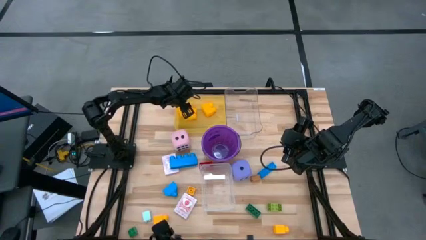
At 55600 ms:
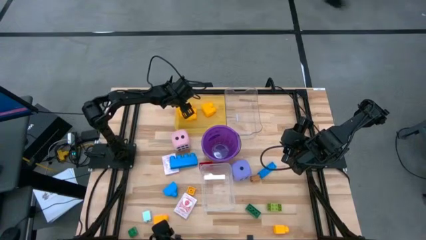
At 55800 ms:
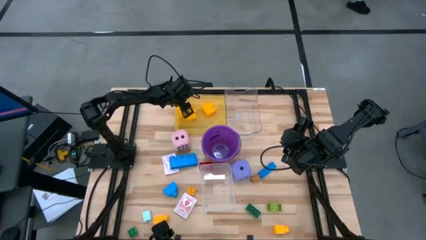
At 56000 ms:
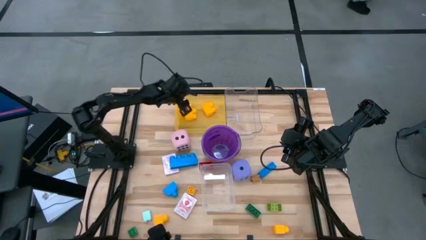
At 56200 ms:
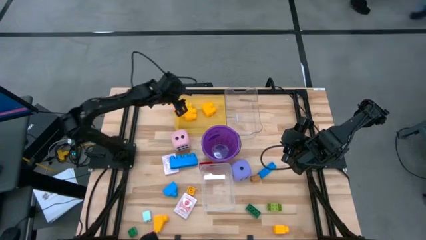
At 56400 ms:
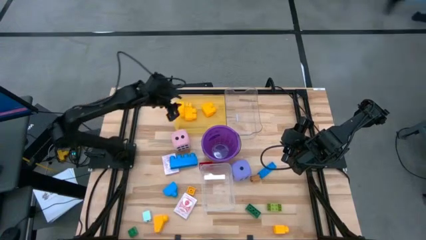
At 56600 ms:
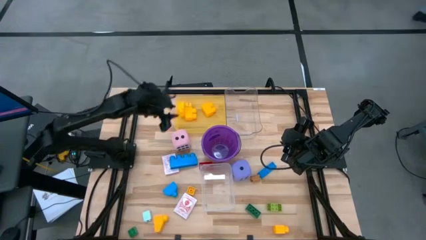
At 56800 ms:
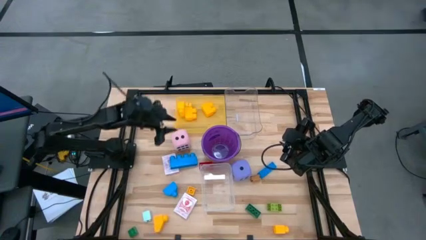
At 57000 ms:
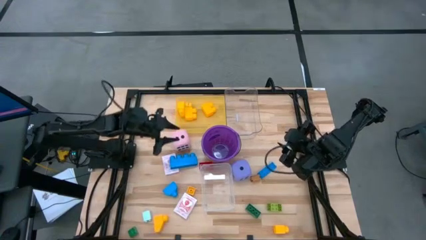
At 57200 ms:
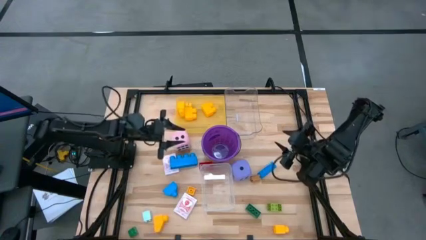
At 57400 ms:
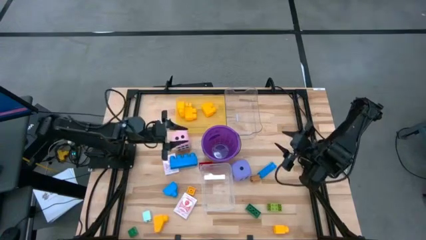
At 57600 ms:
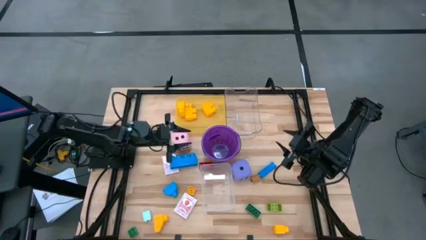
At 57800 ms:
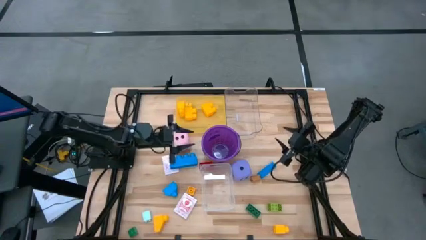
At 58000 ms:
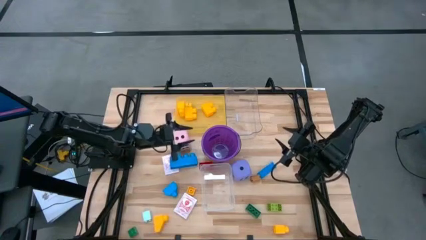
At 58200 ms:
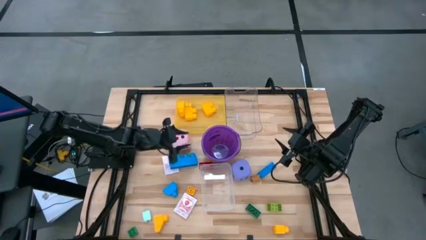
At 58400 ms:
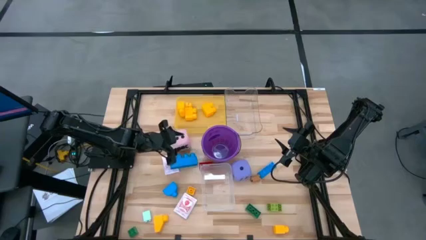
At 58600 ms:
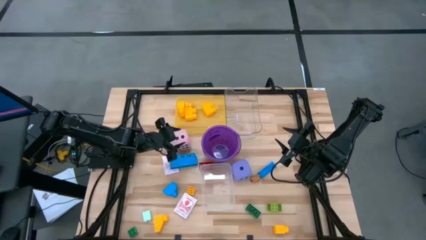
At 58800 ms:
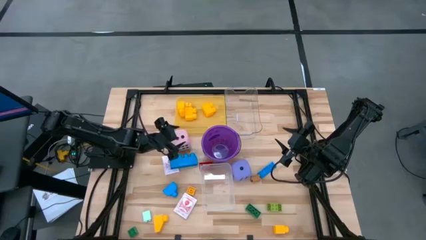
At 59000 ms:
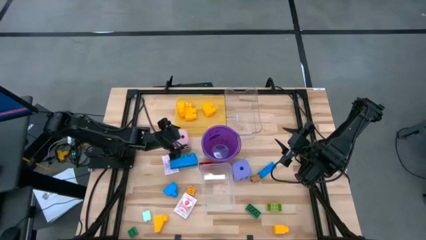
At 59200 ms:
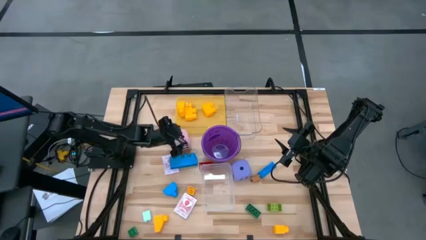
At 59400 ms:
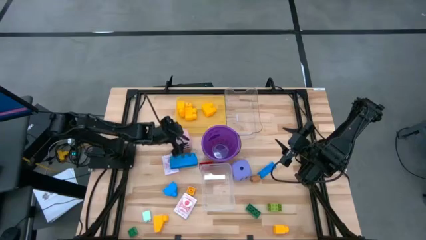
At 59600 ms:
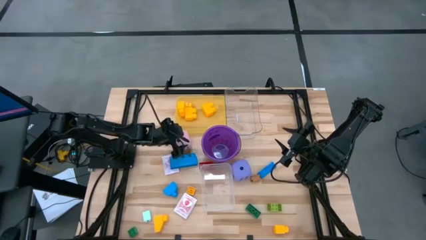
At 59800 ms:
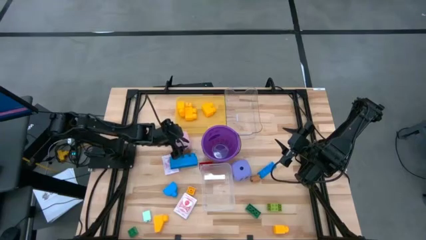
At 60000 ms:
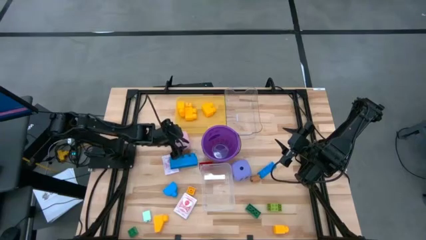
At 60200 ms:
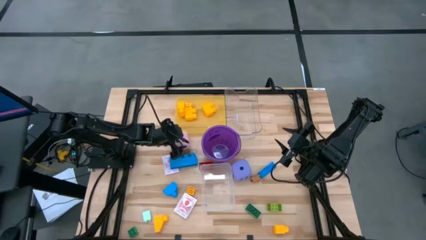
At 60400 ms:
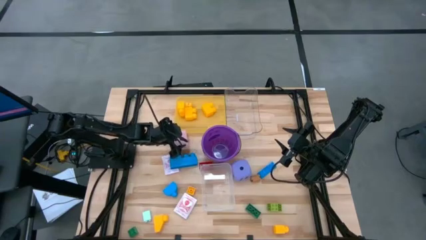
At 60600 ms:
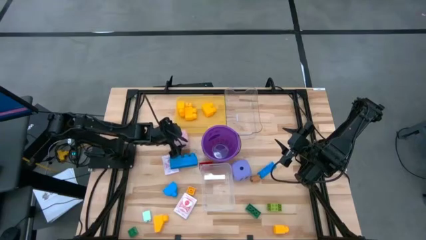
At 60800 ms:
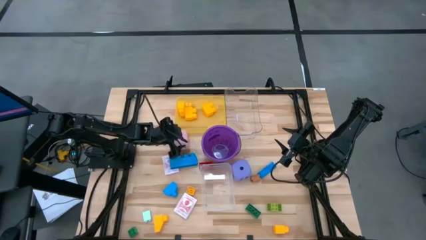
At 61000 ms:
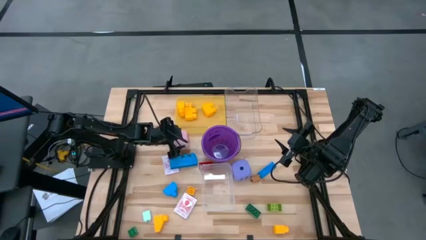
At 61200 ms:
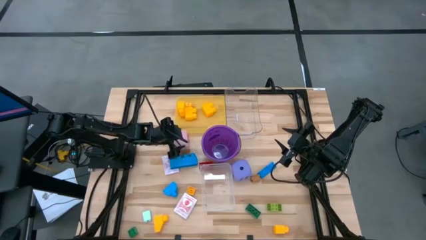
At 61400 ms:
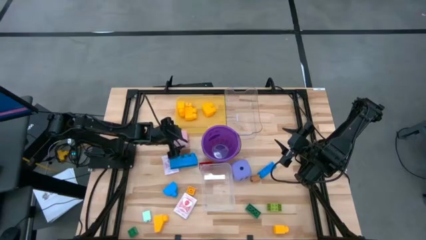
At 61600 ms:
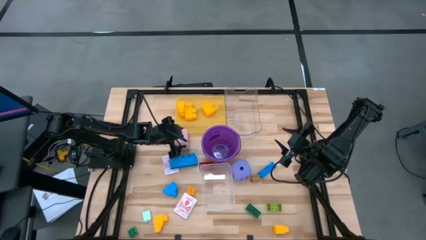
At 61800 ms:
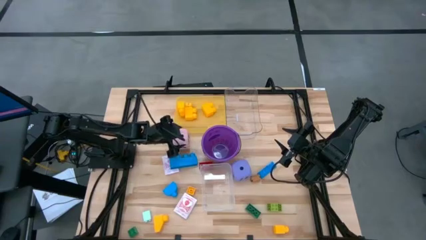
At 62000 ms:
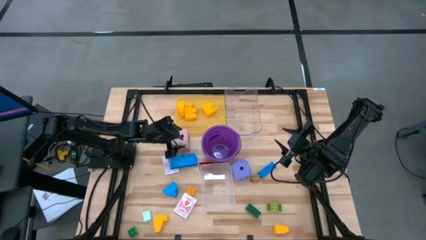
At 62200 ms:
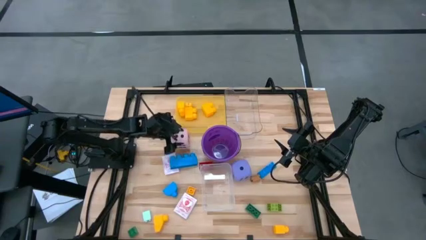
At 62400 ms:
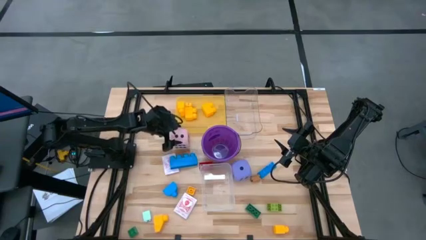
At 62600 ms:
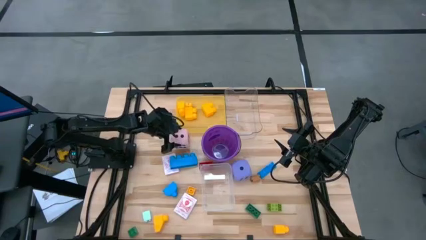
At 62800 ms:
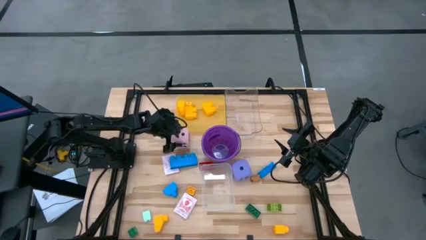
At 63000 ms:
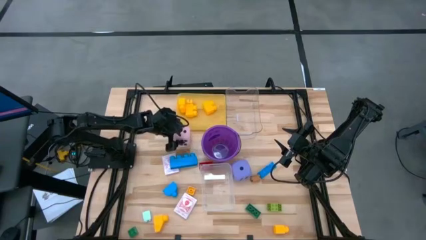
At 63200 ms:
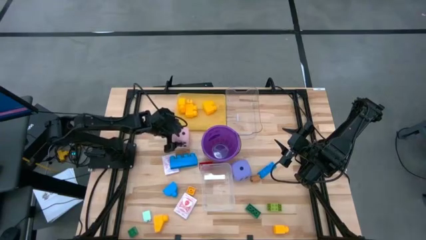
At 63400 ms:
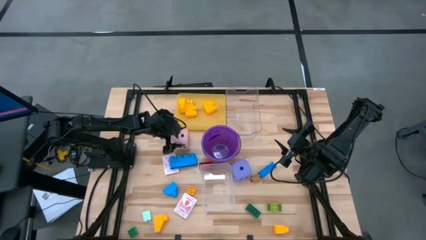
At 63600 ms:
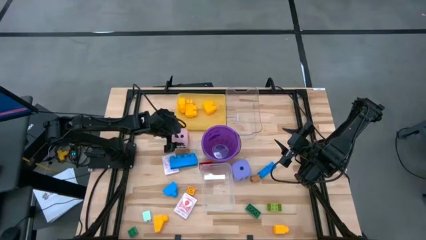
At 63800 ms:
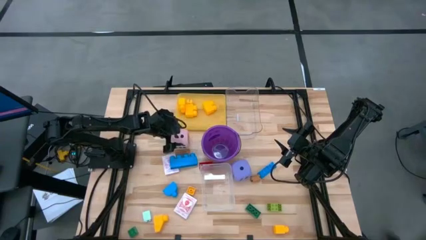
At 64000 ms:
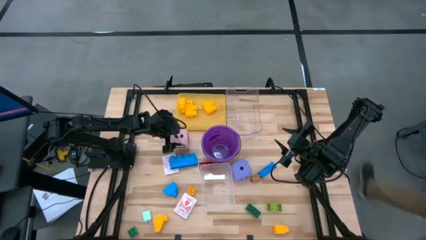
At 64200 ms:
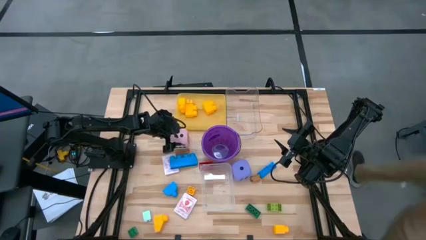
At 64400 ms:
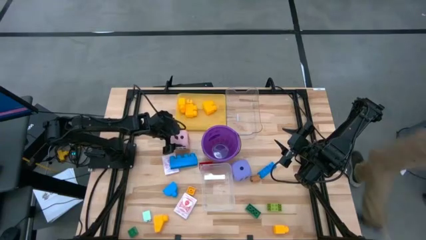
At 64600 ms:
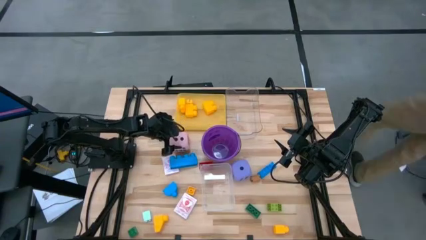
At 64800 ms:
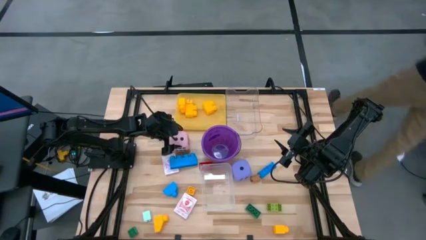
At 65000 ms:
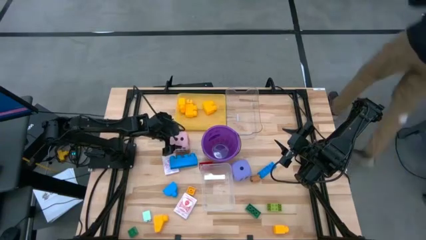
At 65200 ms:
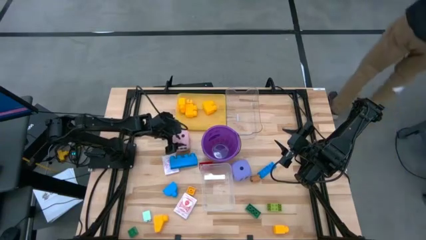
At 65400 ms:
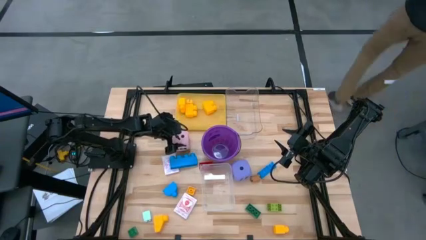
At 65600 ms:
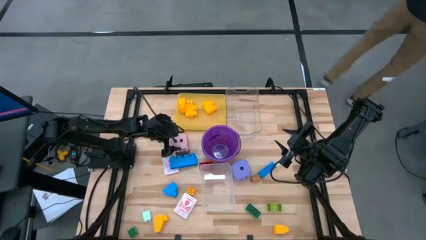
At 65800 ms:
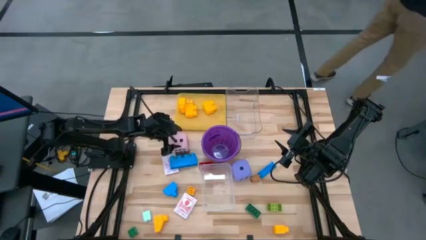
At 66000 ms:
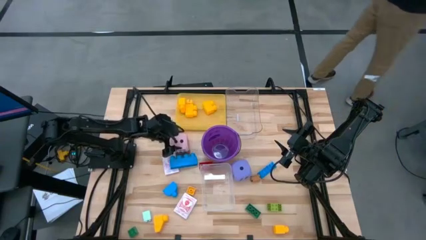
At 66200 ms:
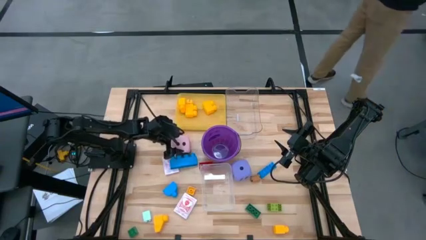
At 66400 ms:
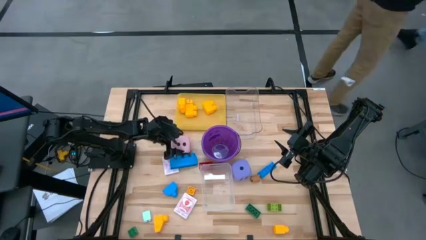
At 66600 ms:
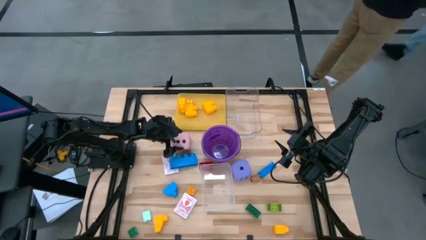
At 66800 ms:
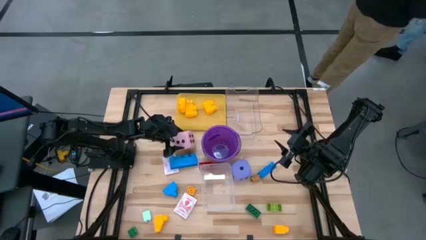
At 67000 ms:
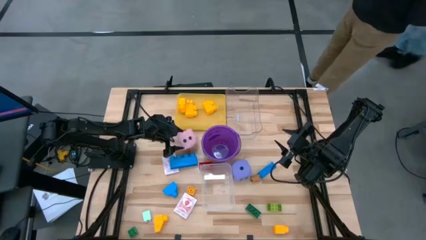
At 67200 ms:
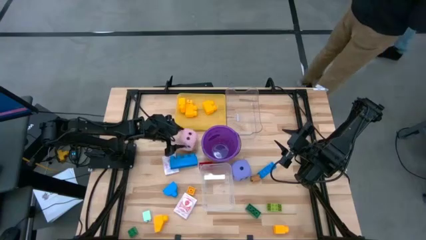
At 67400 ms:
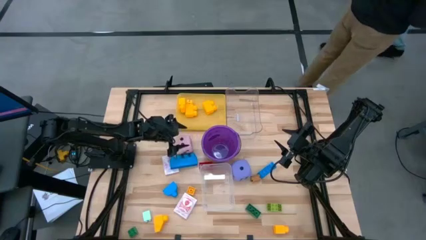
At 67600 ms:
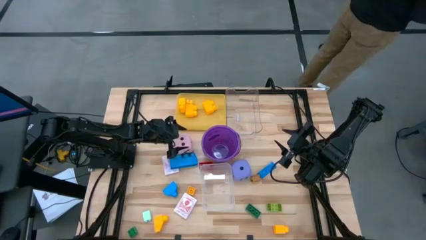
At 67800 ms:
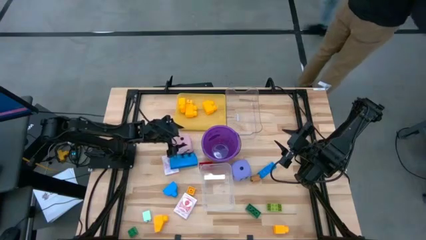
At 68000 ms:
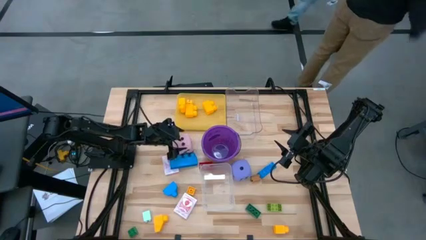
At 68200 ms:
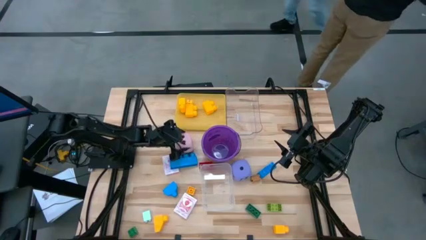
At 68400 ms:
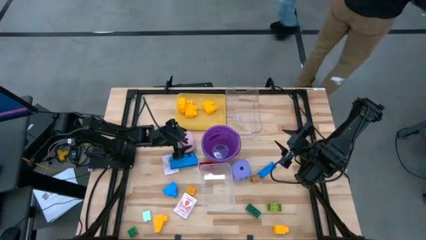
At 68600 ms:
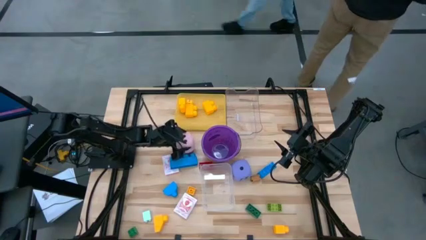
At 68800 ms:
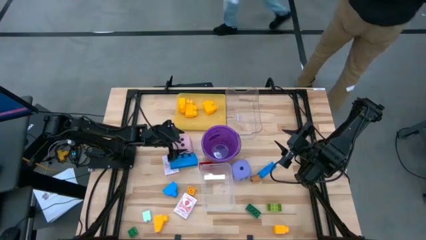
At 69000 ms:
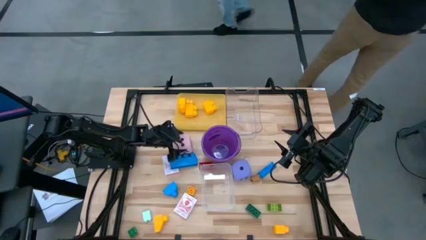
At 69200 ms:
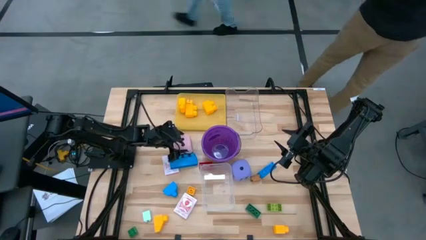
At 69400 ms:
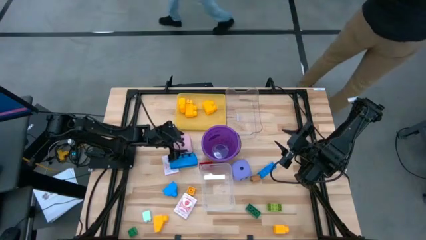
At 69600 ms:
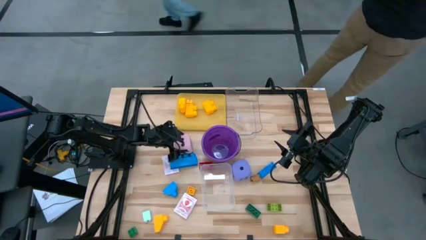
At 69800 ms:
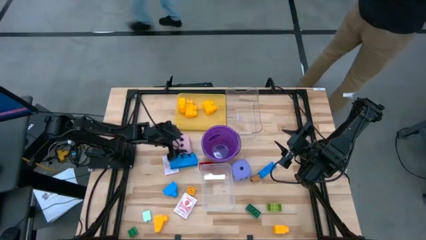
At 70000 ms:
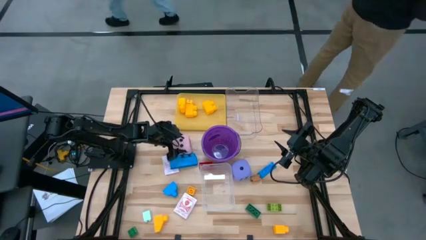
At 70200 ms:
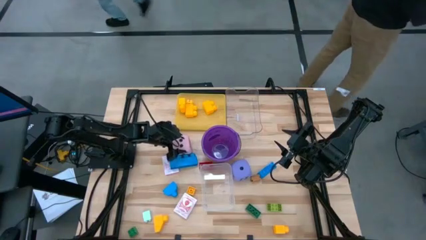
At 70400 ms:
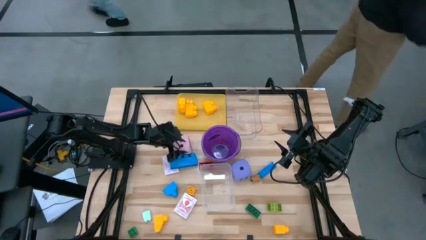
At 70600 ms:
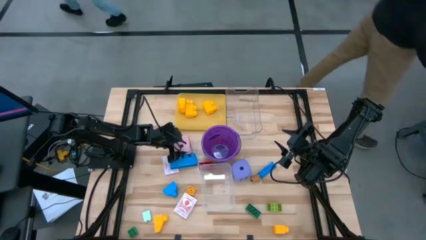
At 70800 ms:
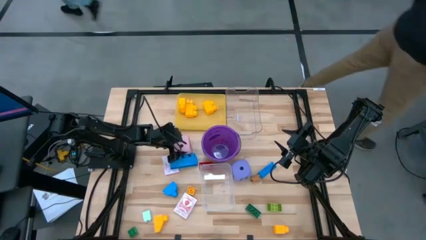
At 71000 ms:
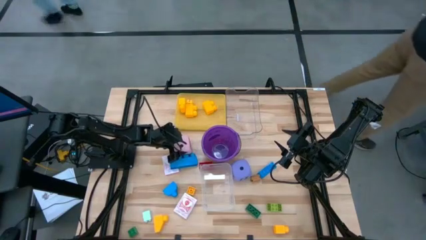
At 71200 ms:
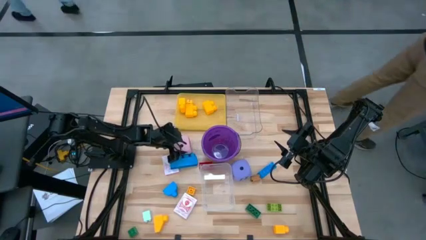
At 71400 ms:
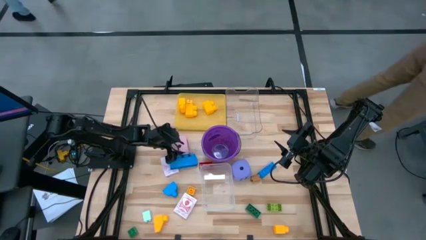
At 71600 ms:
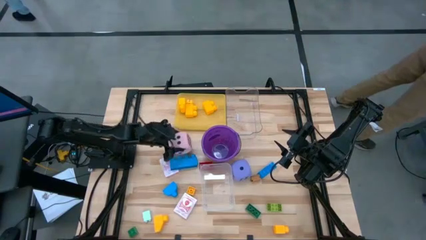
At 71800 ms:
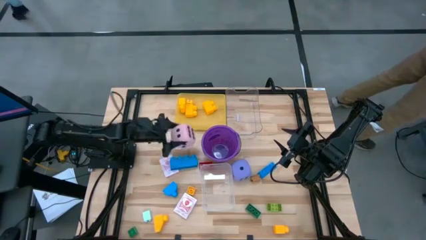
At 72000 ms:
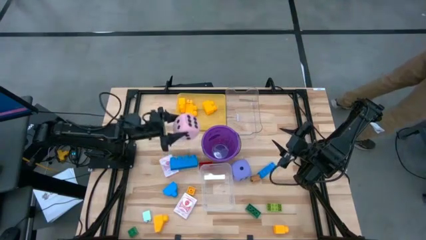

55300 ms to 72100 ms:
Task: Pick & Place Toys
Put the pink dice into the top transparent bin

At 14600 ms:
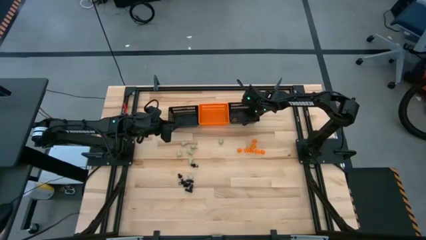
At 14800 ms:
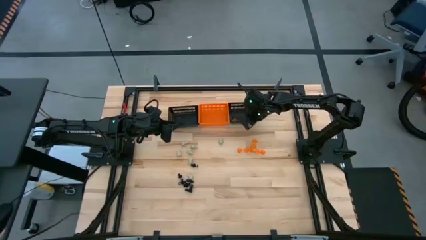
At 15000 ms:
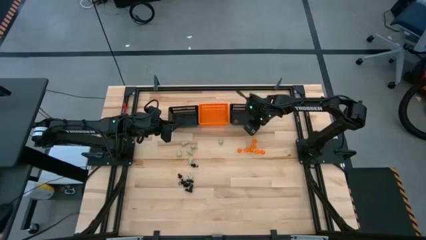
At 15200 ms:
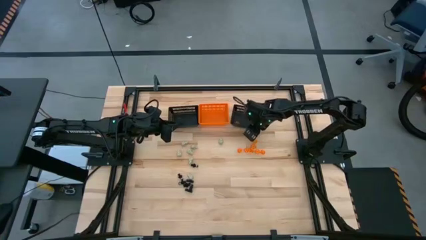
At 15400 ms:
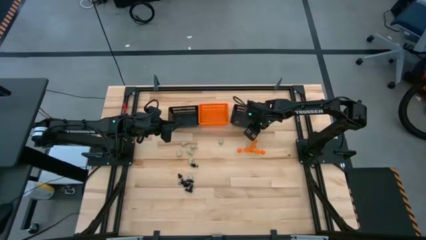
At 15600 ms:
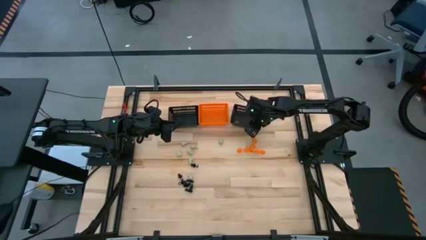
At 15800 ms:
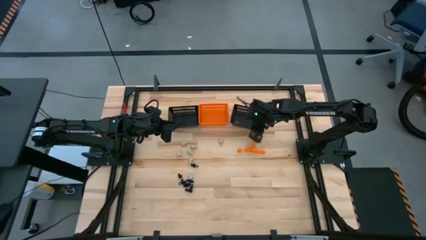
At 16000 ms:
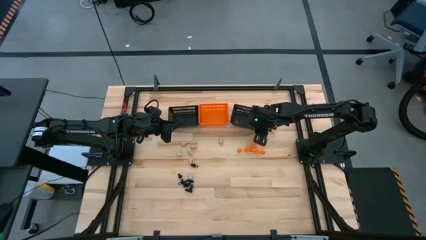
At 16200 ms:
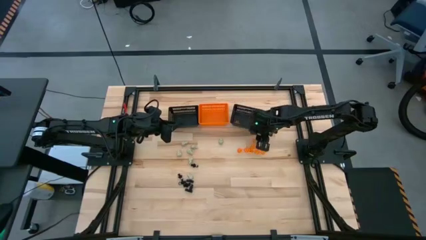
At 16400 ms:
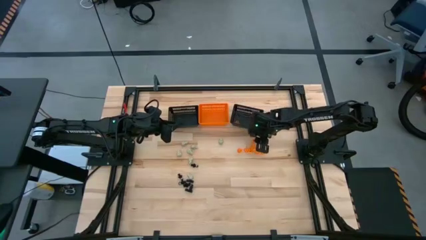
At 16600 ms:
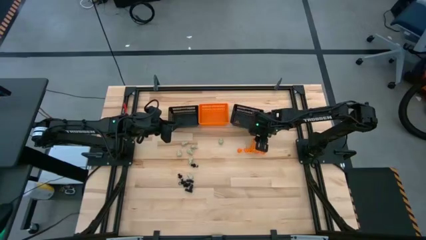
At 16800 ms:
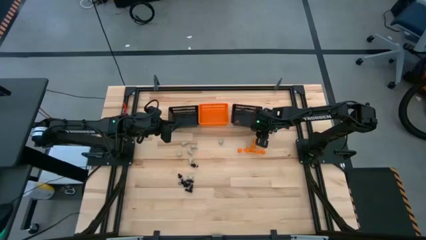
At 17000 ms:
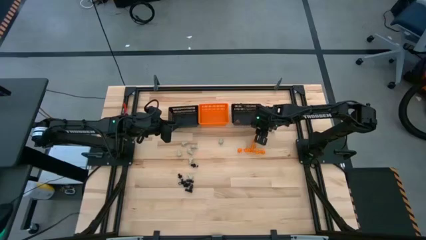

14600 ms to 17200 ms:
Task: Sort Halloween decoration
Adjust the right black bin
